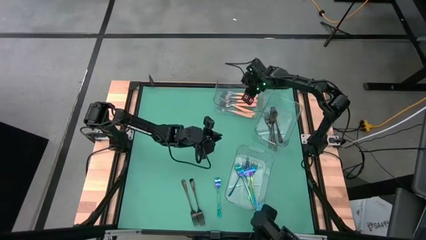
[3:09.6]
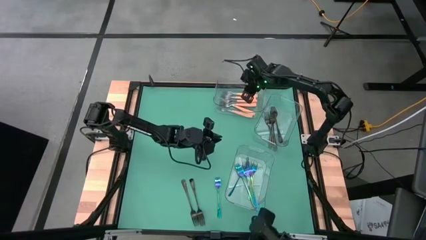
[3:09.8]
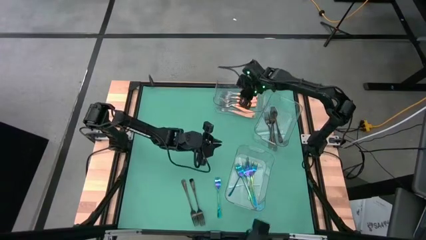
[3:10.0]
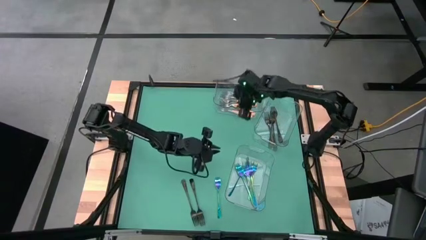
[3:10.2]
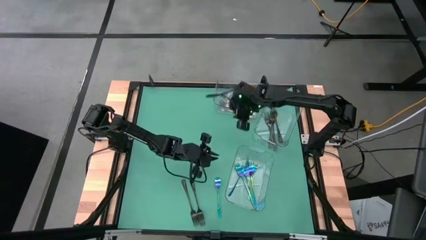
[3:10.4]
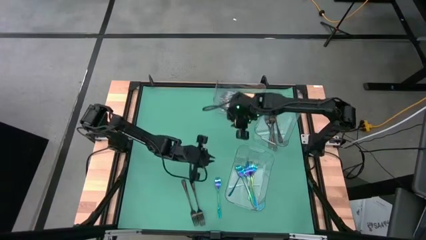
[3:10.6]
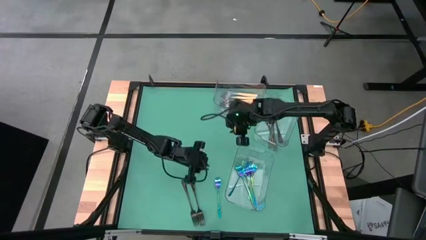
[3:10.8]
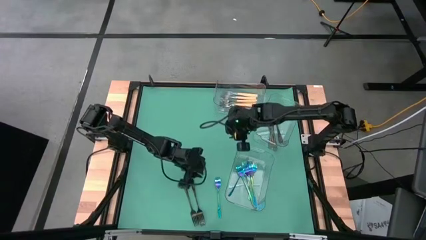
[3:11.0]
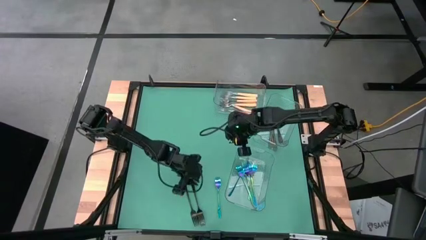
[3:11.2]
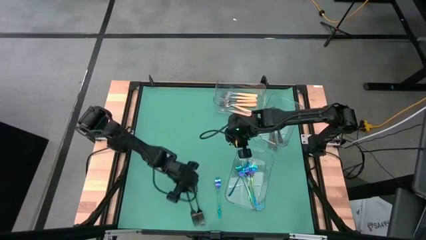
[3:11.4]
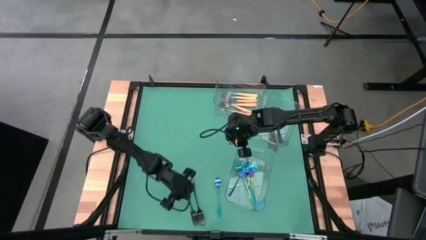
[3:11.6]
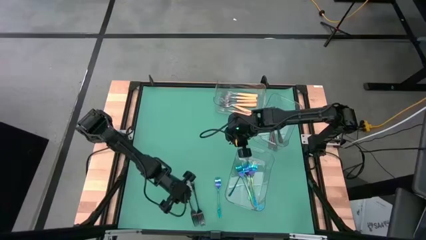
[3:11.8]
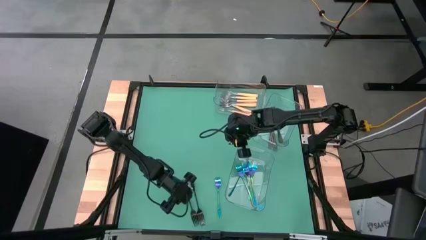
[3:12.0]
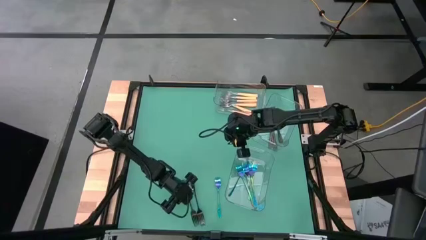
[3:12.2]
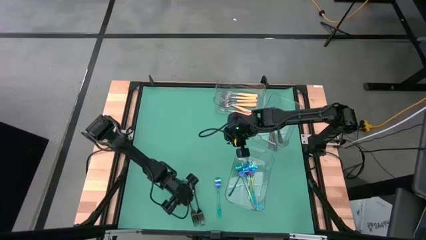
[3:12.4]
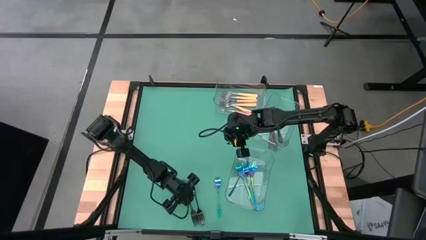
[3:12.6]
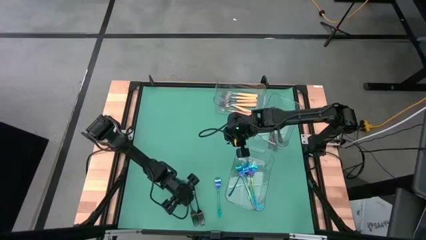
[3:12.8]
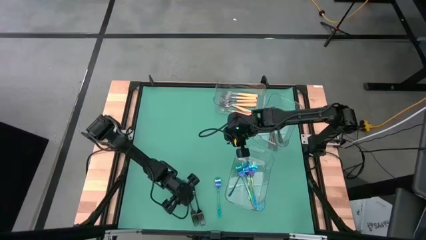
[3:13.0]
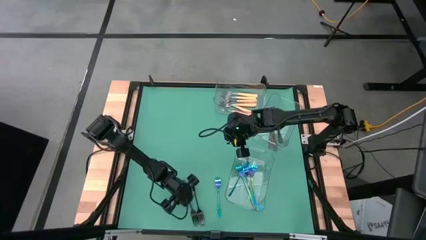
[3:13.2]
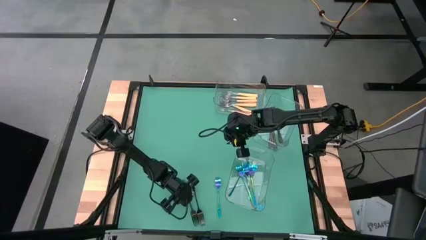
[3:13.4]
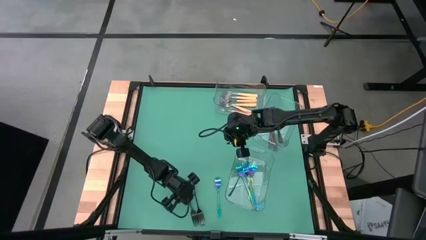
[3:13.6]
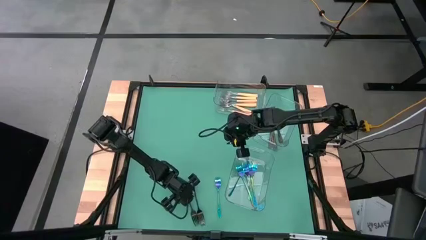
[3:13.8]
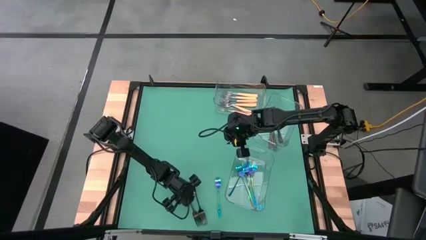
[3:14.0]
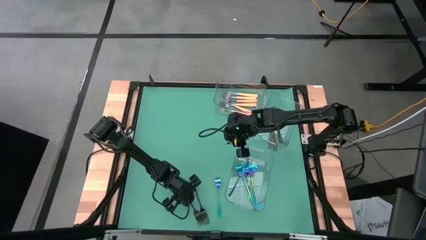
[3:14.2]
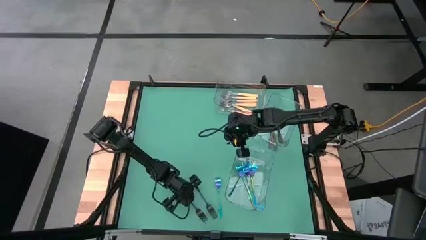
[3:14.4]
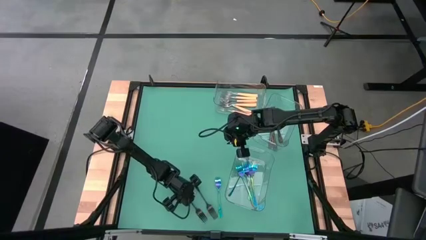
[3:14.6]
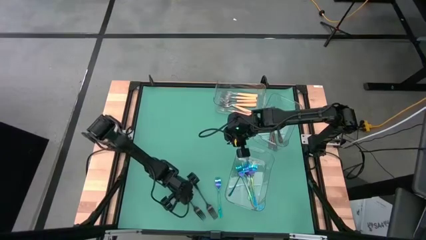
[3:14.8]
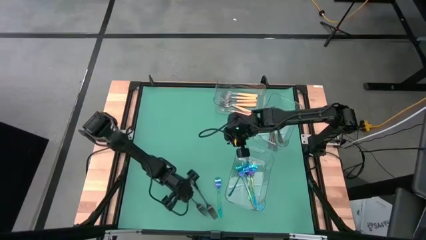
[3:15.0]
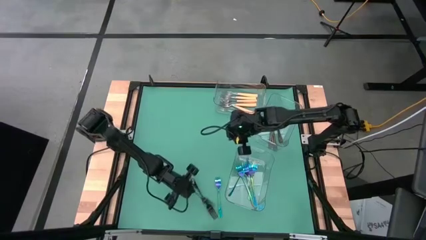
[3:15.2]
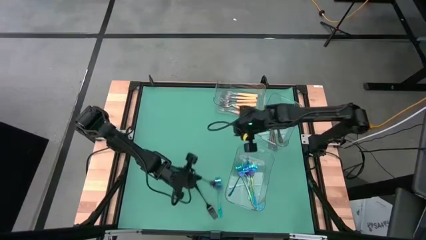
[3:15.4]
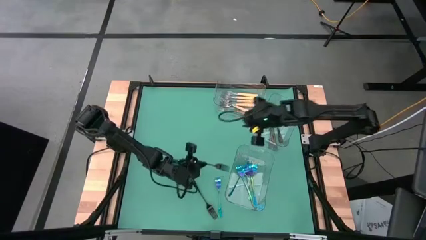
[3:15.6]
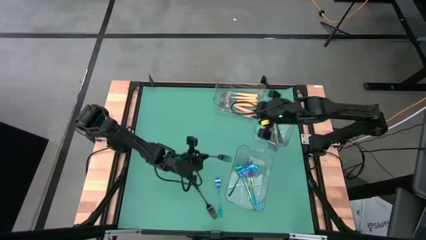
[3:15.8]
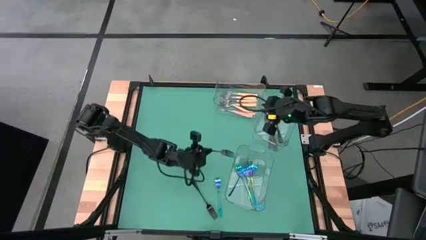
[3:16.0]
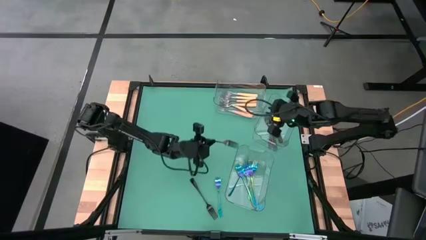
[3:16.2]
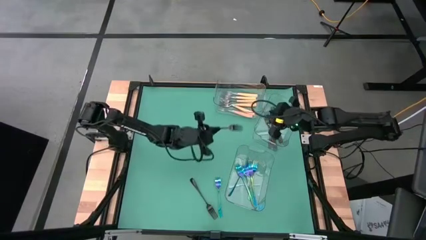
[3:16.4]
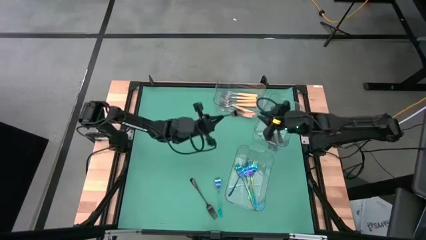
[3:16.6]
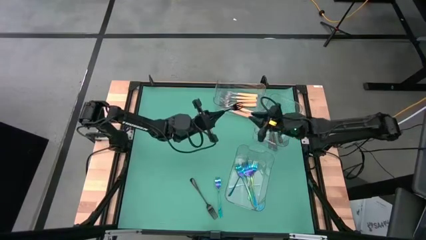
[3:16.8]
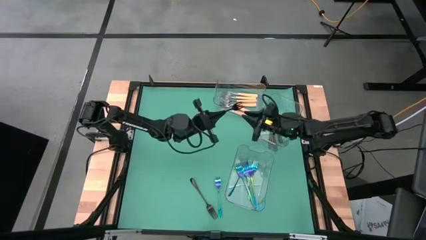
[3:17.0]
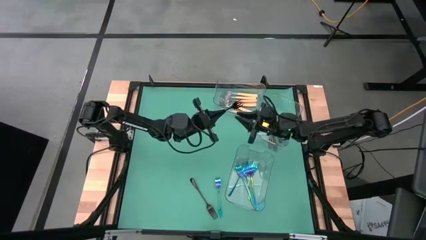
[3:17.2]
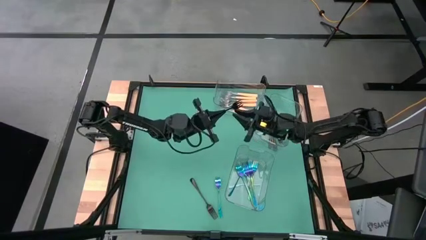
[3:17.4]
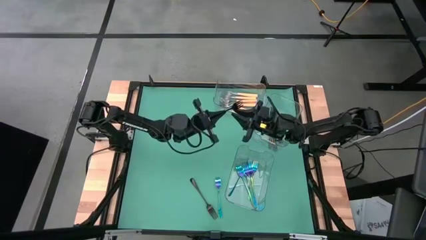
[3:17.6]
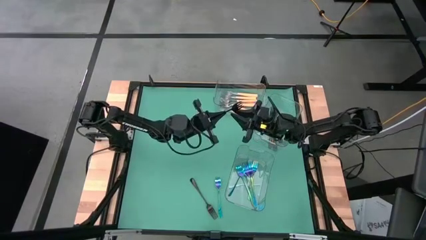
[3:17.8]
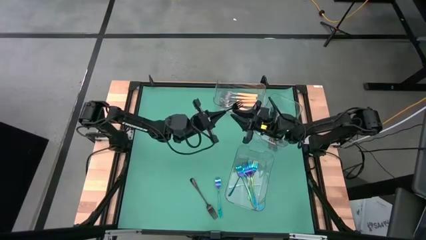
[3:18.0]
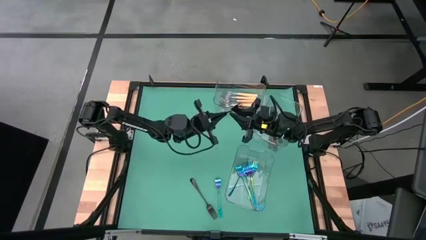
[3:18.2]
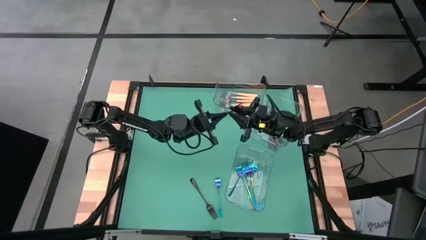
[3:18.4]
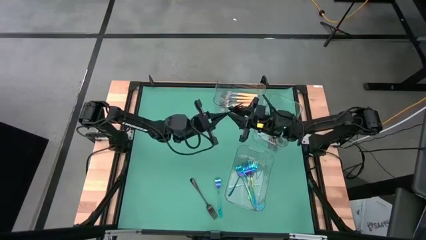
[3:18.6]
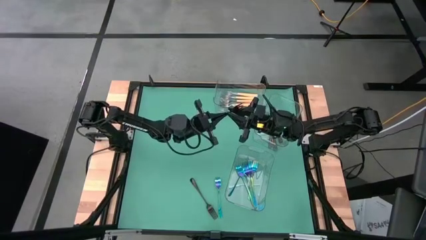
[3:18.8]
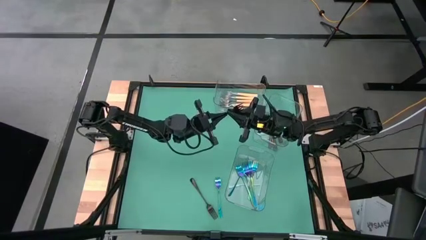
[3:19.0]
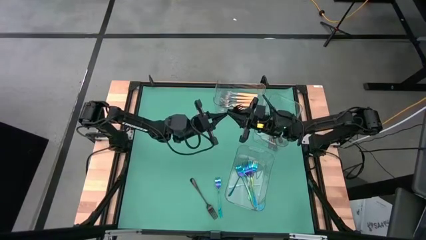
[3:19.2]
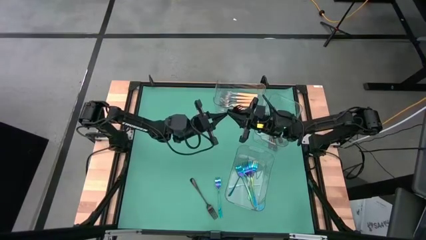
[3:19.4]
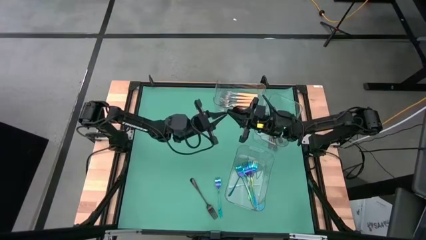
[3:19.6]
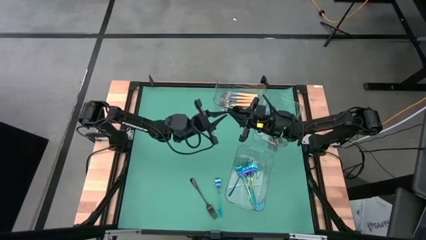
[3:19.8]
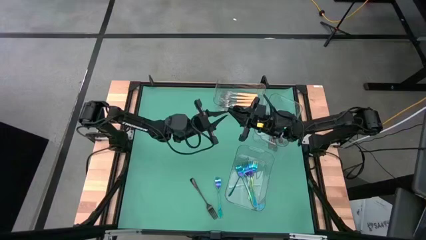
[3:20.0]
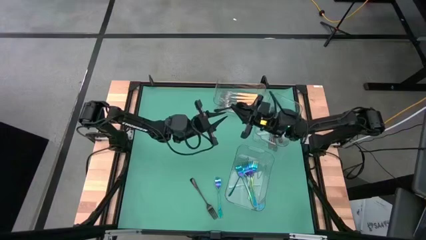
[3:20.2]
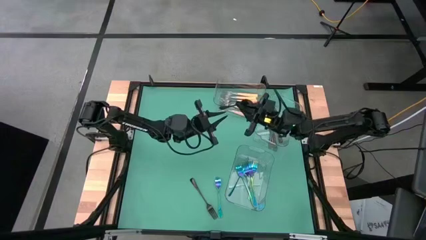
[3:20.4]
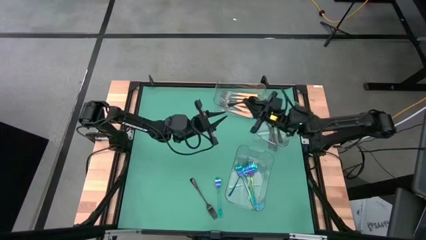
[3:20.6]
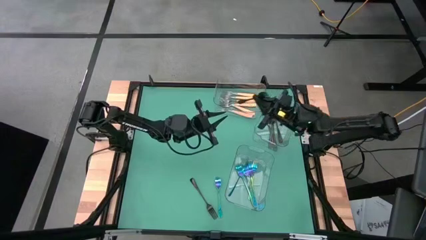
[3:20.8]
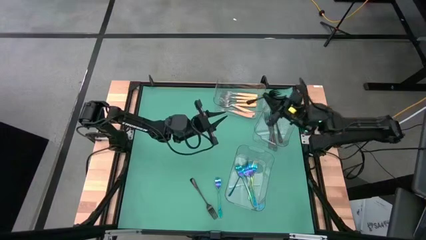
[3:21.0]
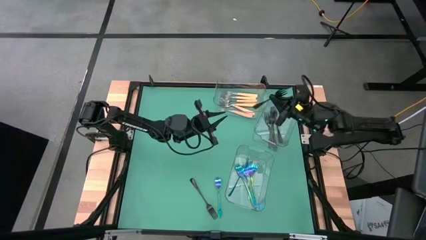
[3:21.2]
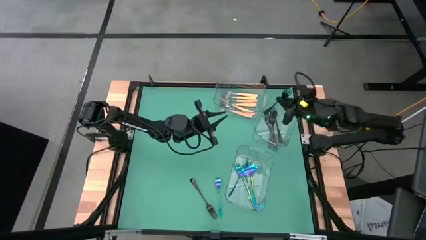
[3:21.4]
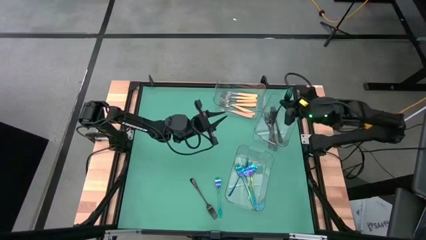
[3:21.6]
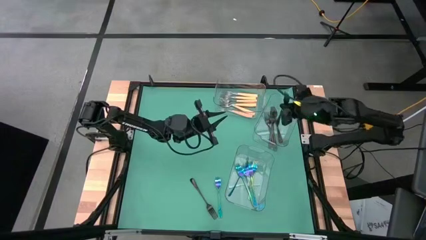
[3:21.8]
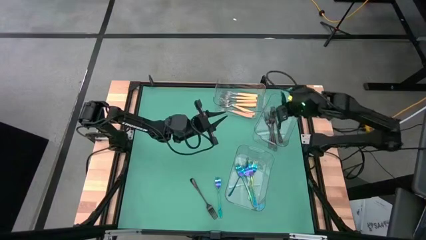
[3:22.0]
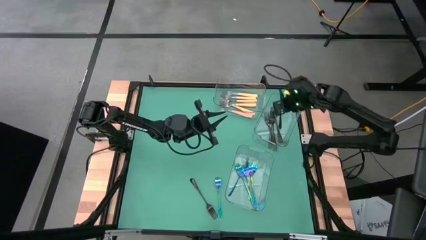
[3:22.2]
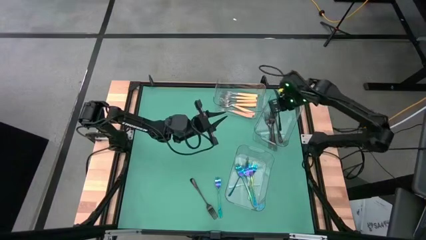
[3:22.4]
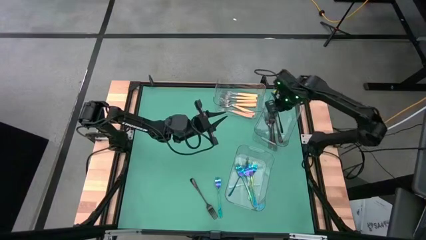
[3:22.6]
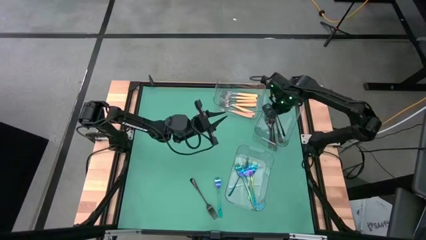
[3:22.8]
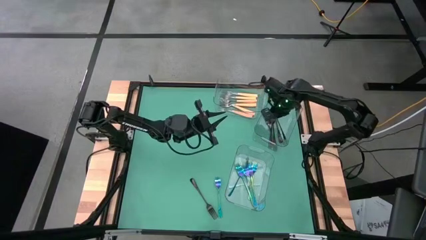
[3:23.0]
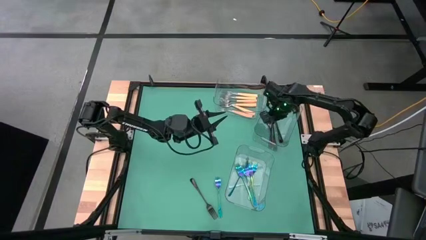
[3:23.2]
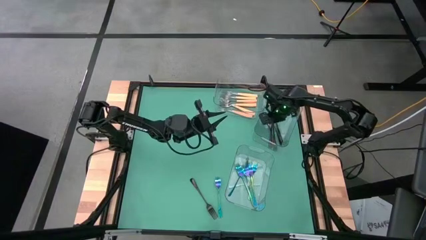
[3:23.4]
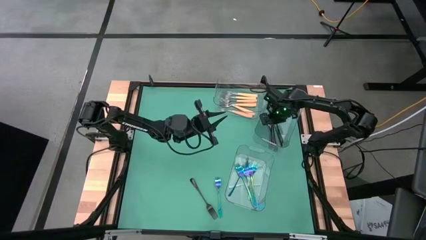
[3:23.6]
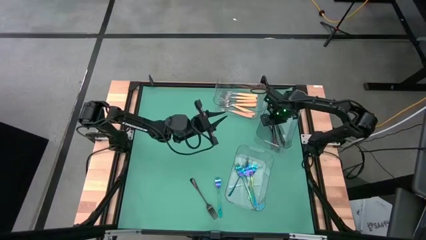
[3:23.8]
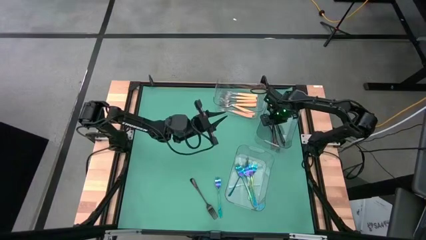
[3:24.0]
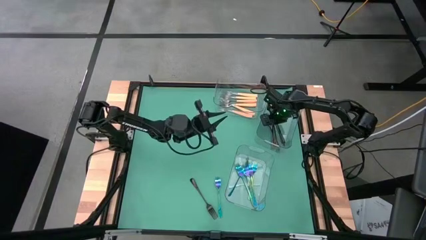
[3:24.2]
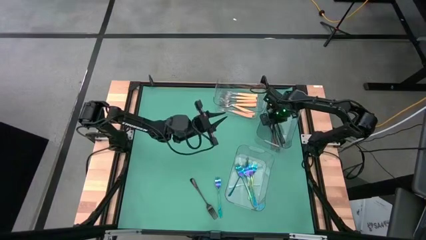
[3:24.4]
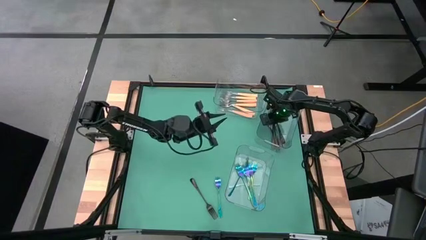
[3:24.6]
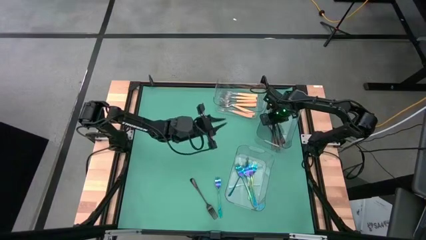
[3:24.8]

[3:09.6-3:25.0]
Task: Sort silverware by color (type)
Put the black fork into the center transparent bin

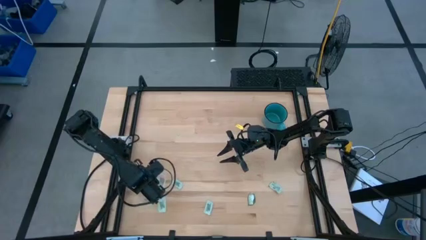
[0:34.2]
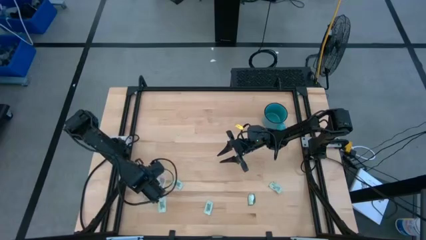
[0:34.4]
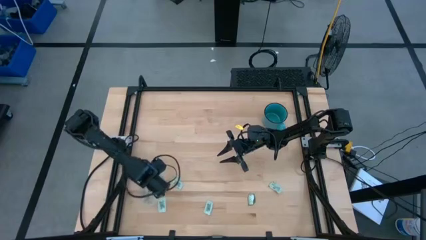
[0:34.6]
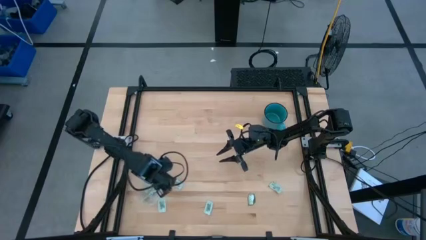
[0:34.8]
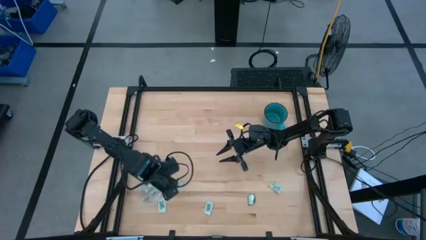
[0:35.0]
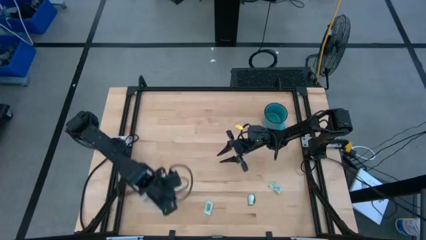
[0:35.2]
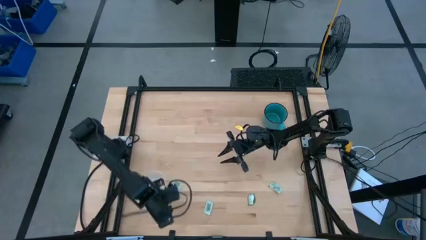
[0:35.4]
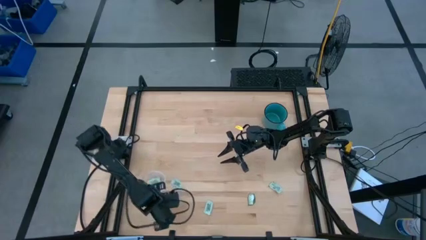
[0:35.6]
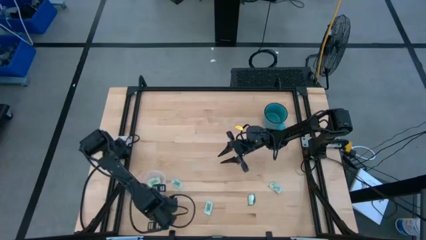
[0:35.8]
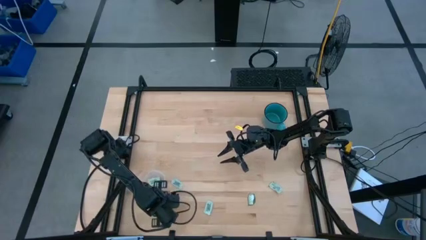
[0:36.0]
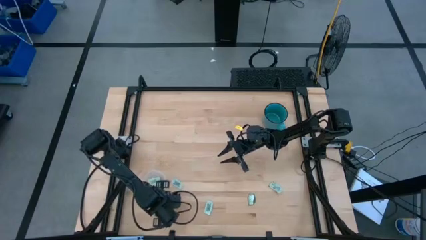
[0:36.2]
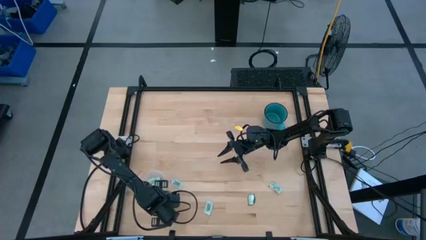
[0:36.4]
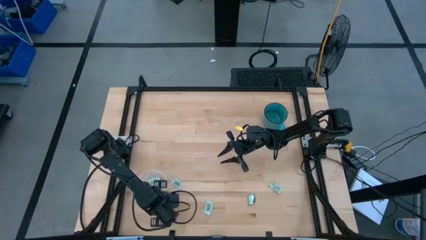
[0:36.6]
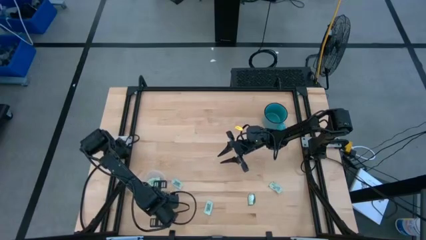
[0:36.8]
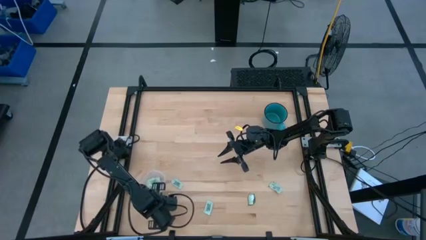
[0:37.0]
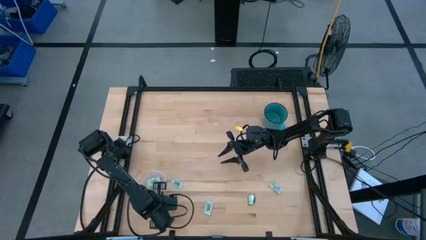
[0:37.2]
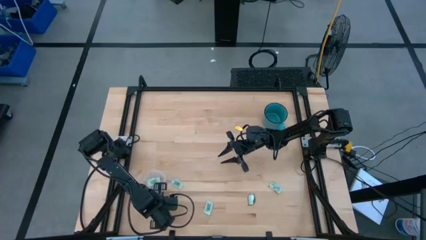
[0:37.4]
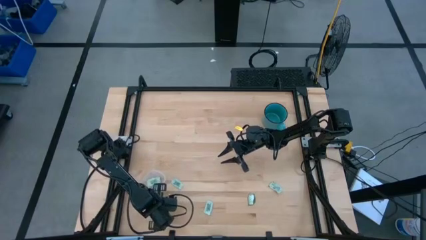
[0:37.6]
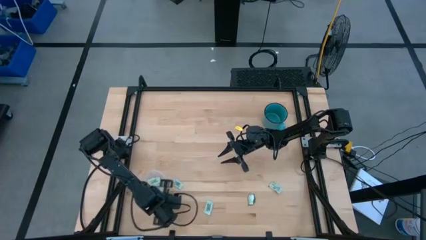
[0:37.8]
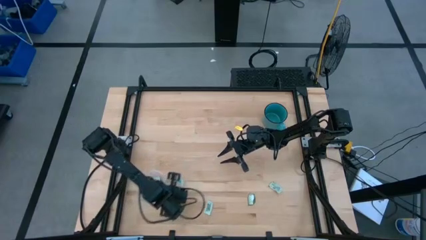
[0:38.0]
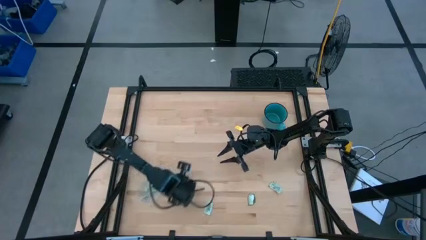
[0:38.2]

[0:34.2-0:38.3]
Task: Pick and place Stevia / Truvia into bins
Move the white stevia packet to the middle left of the table
